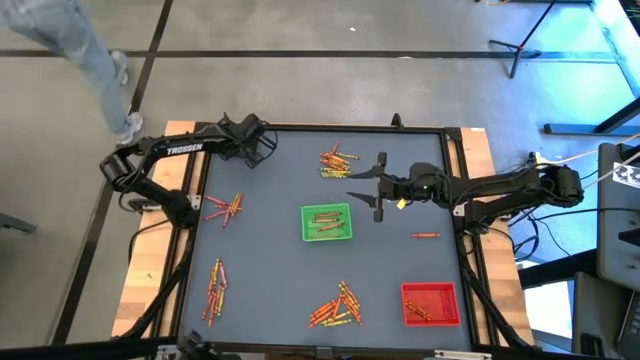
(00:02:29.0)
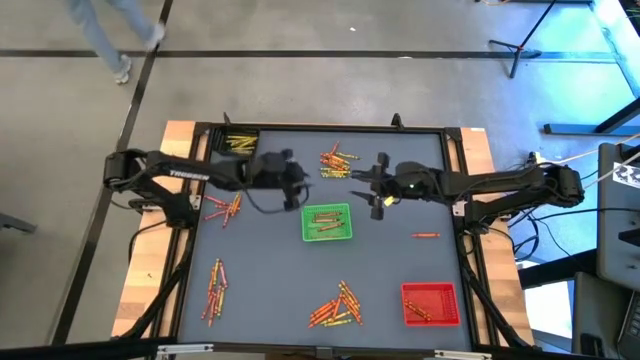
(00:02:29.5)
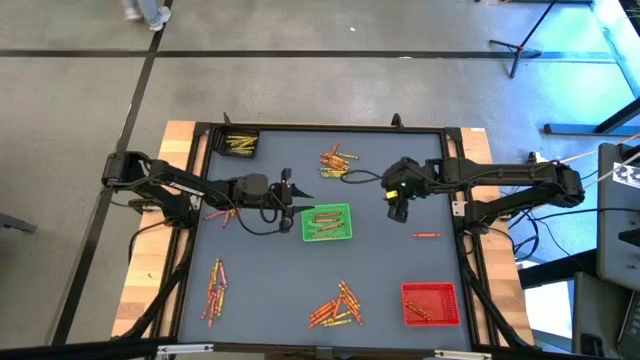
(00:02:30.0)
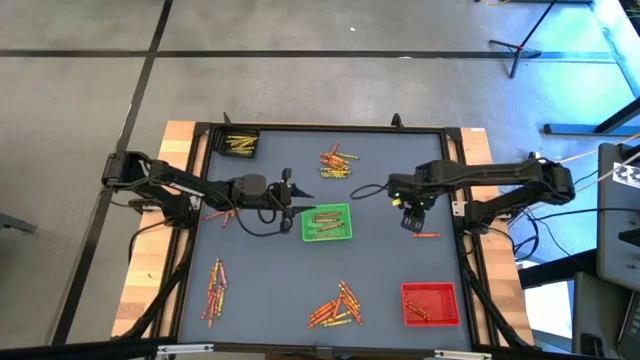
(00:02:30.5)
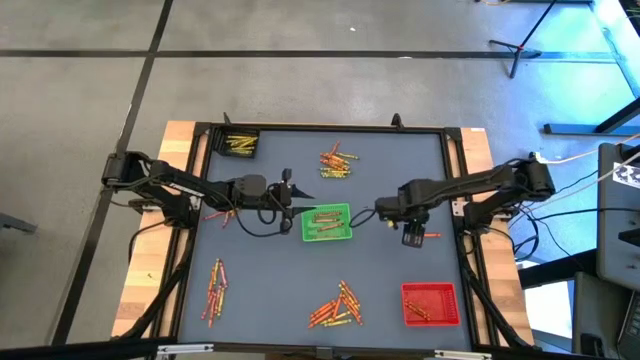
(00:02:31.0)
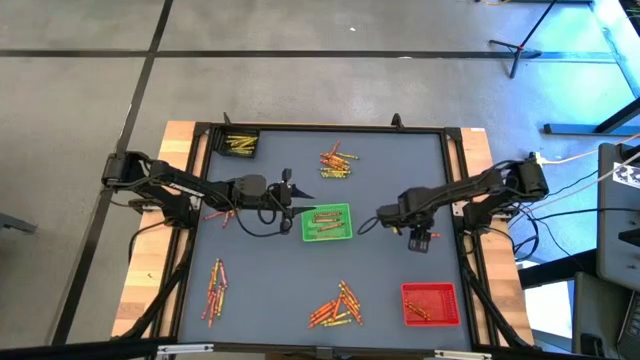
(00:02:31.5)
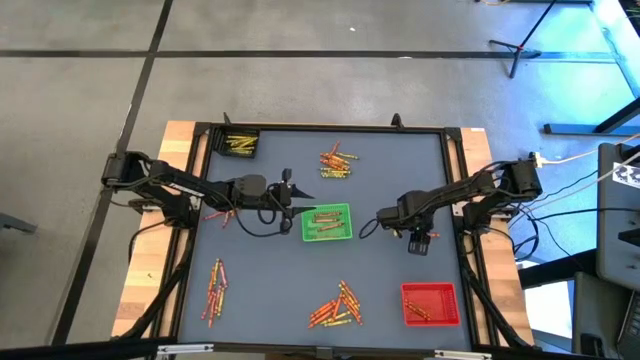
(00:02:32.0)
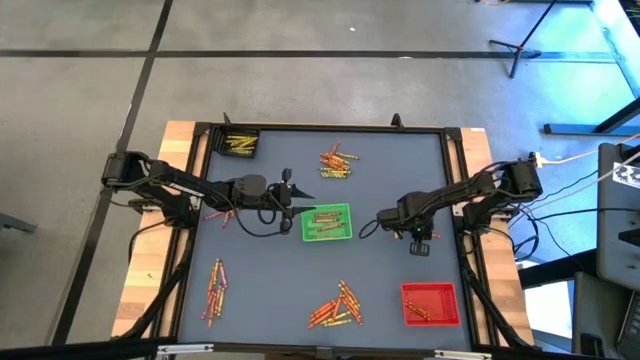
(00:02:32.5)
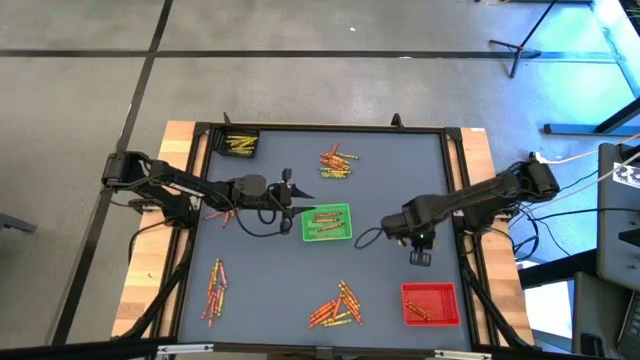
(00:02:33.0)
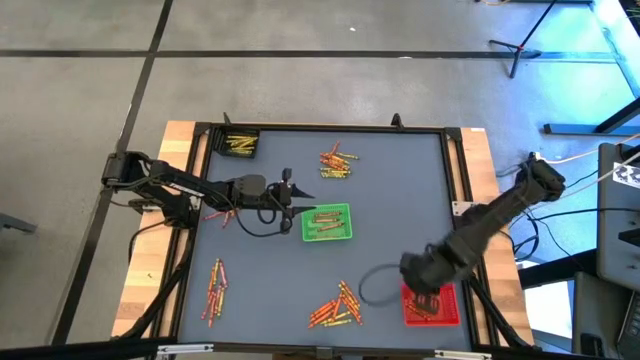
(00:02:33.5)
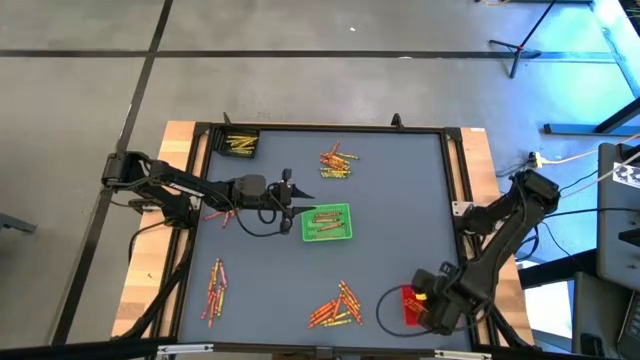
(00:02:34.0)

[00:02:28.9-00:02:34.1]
Task: Sort crayons
Put the orange crayon into the red bin

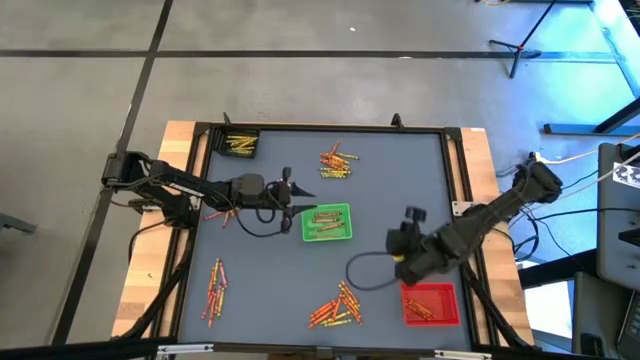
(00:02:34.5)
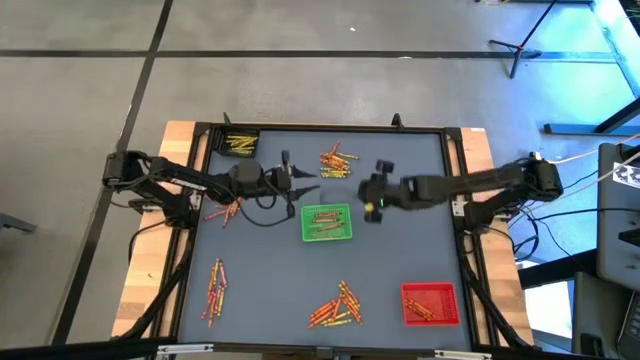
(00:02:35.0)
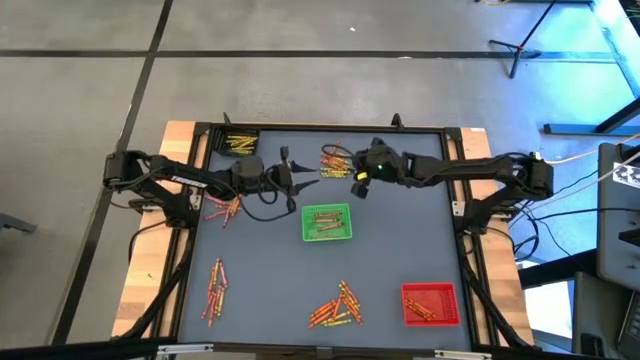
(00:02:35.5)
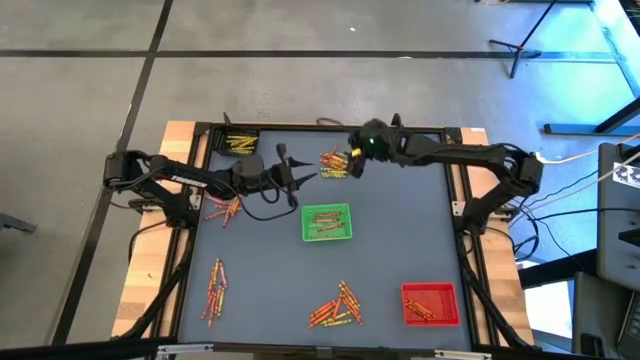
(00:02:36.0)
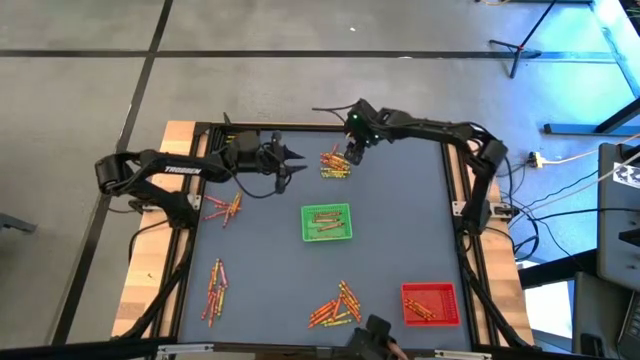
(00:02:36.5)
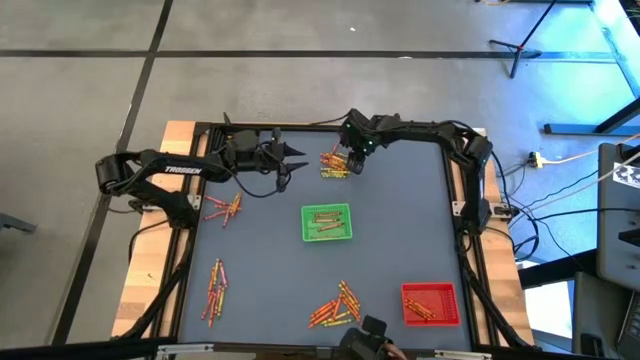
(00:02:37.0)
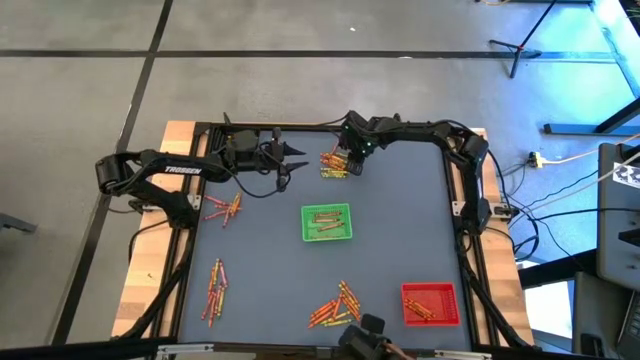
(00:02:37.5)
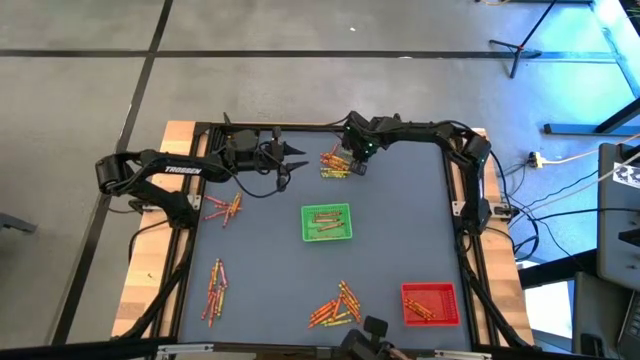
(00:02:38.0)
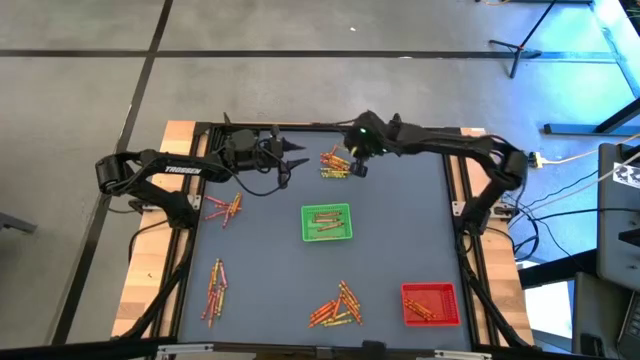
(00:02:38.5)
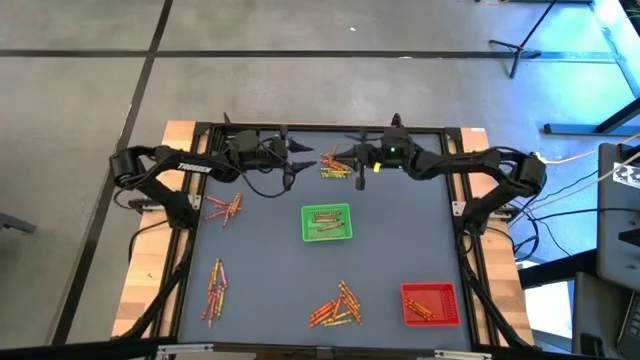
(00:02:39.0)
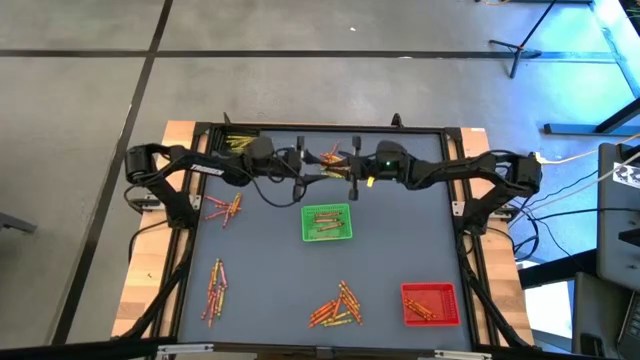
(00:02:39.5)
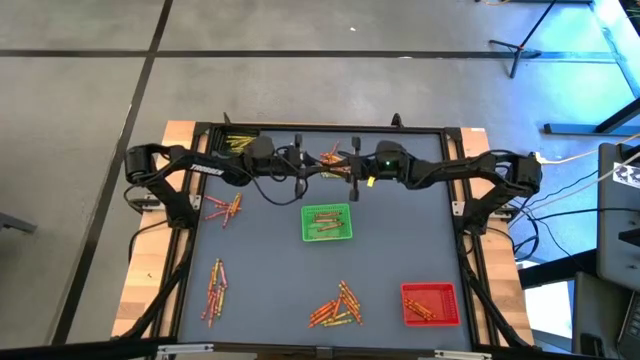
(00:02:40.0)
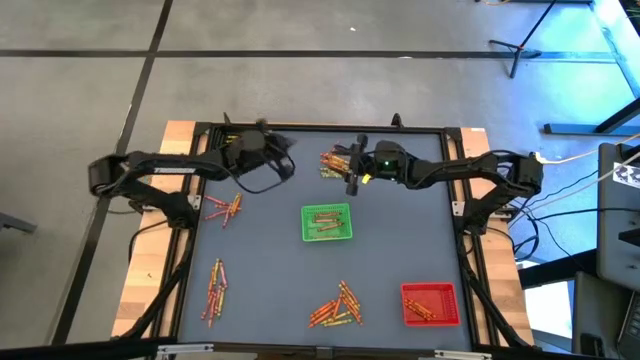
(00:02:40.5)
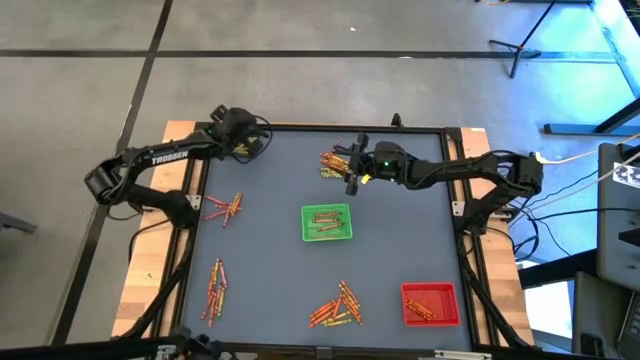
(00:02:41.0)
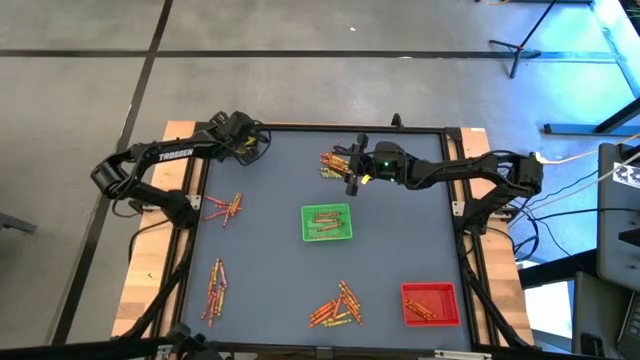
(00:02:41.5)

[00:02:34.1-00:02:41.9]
Put the green crayon into the black bin

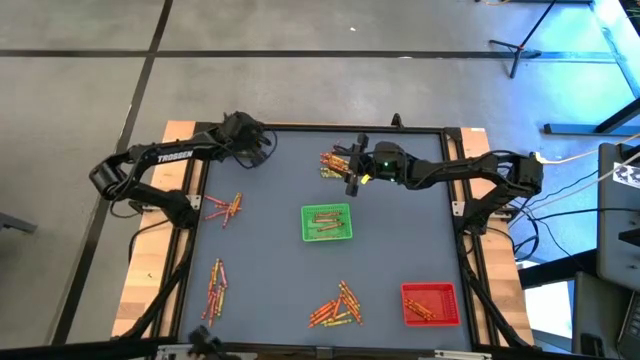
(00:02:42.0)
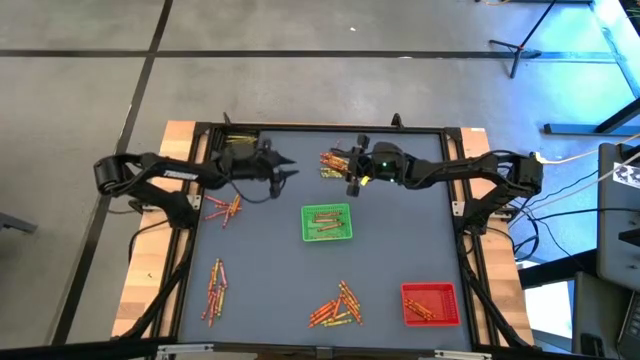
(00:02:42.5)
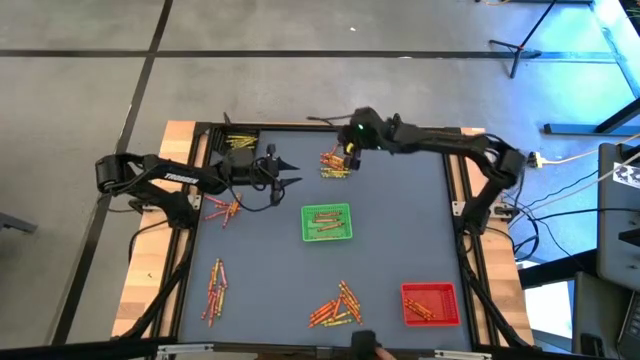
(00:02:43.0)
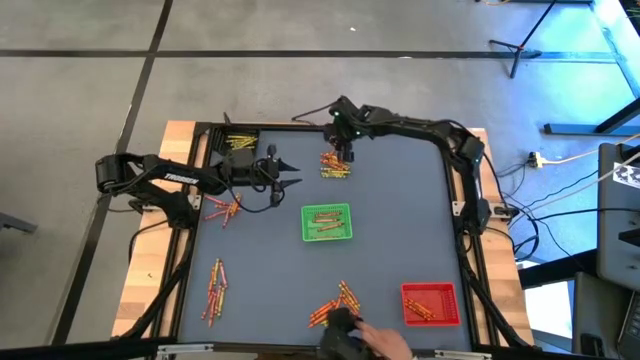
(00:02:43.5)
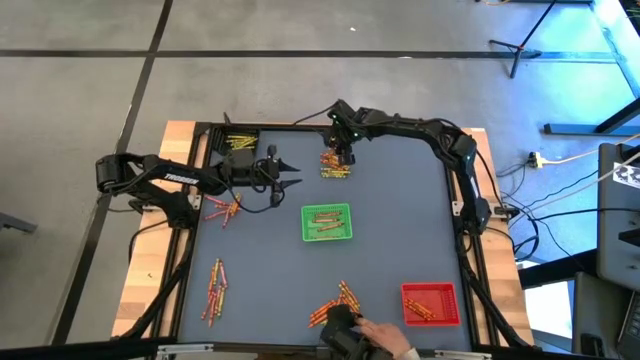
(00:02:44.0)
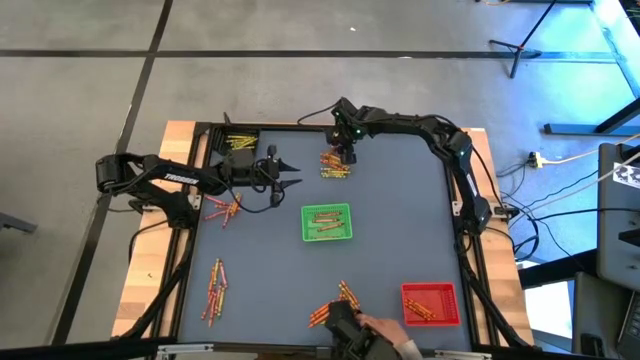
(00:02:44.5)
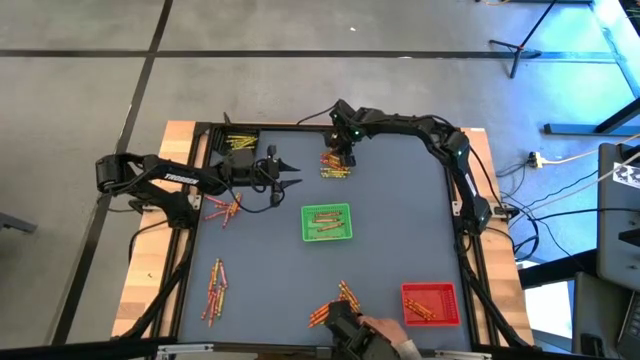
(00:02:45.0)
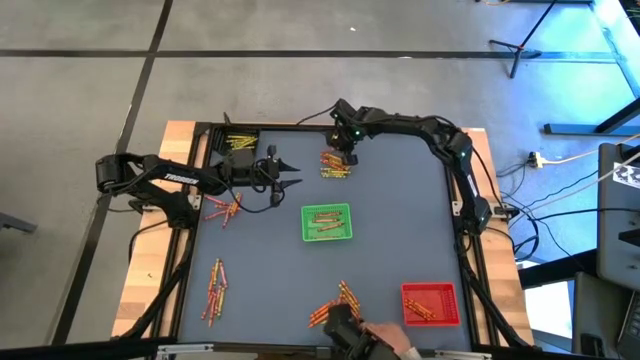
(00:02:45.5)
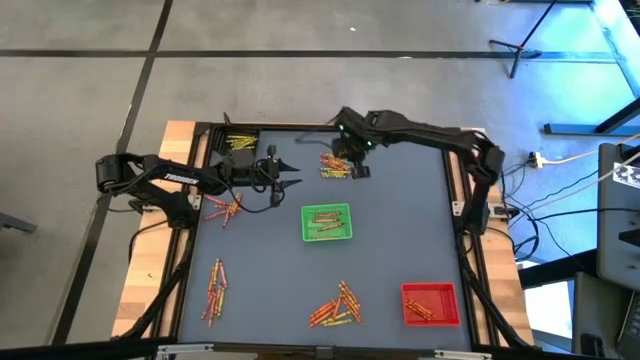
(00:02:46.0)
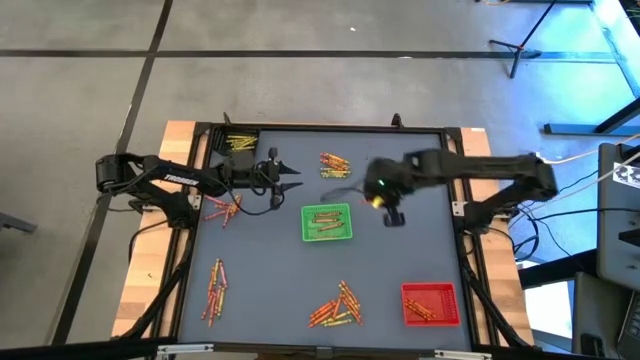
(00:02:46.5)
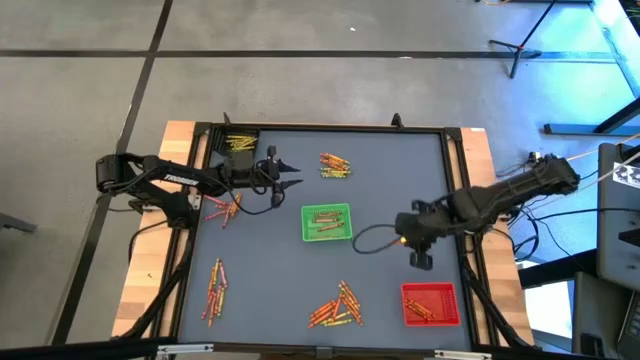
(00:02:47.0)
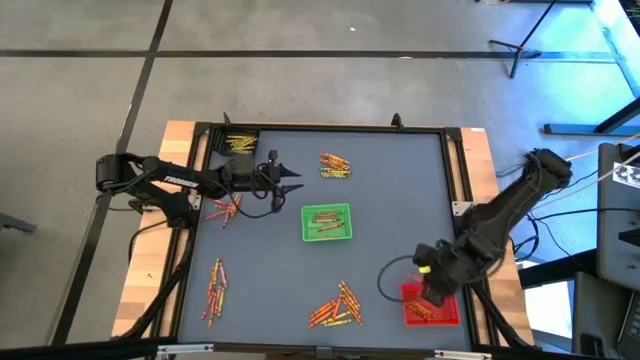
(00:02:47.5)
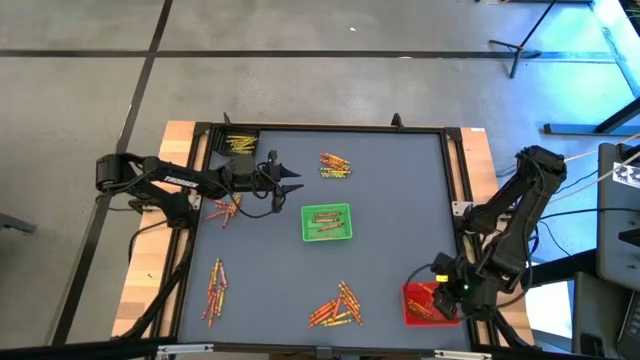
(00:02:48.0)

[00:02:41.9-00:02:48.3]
Put the orange crayon into the red bin
